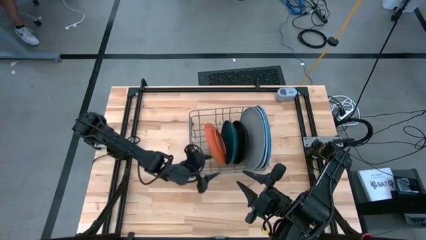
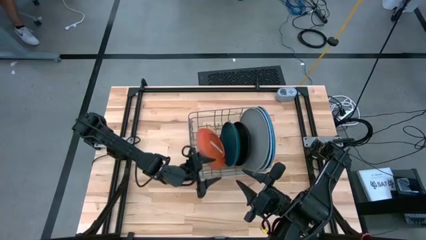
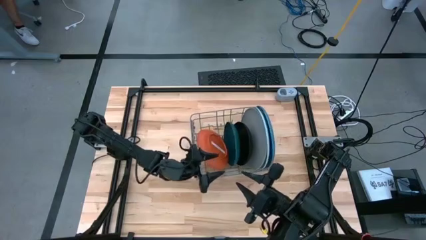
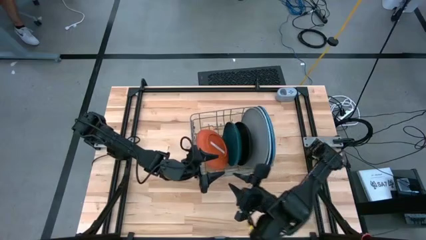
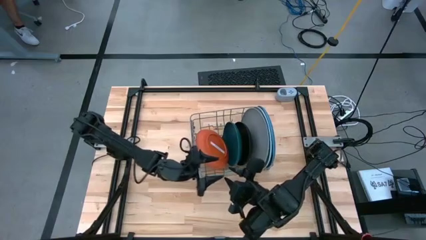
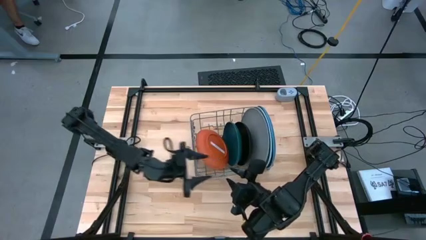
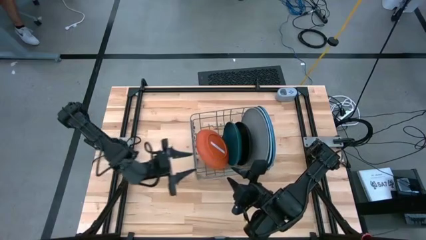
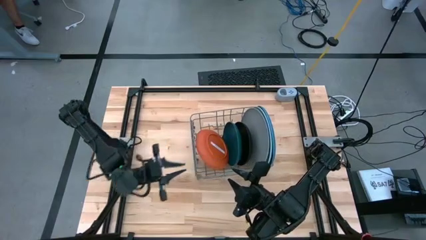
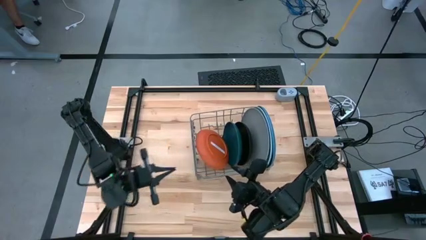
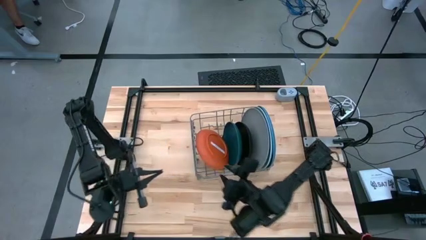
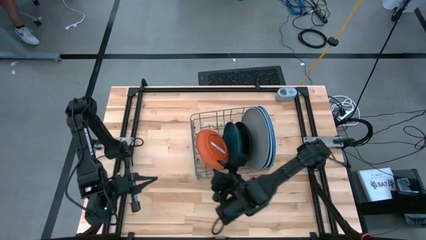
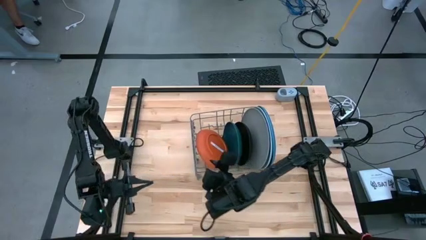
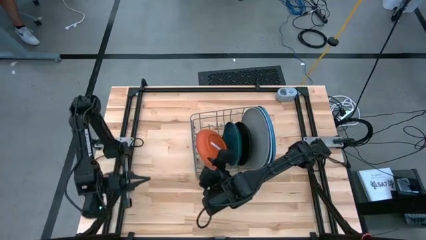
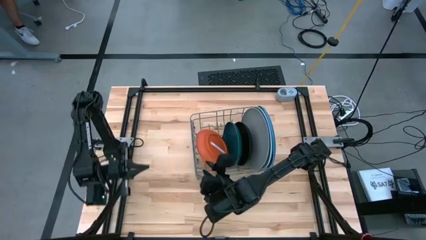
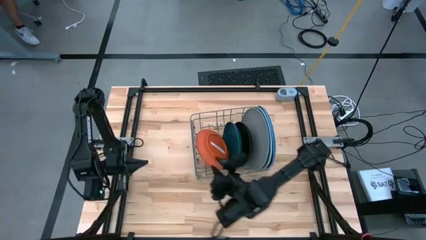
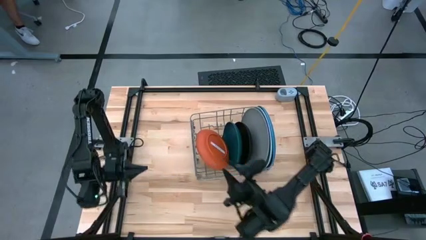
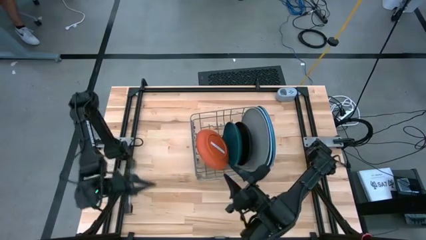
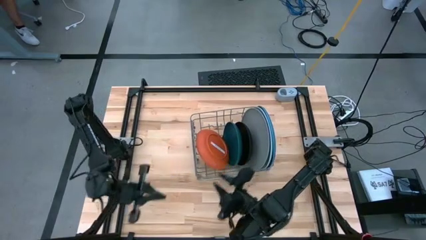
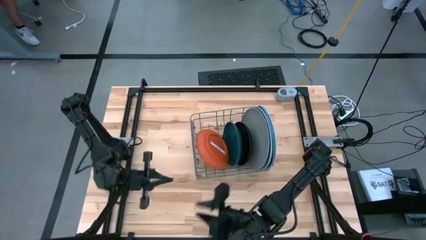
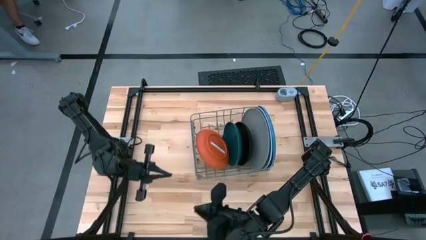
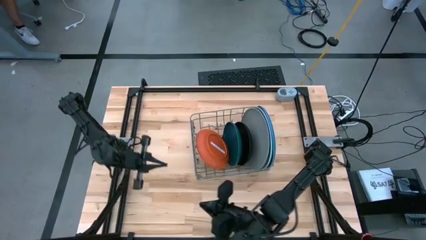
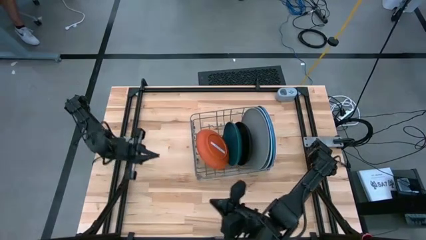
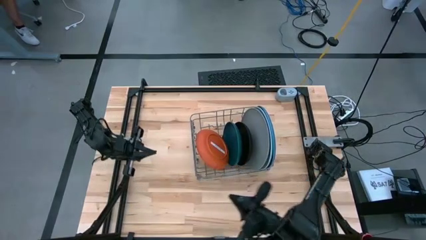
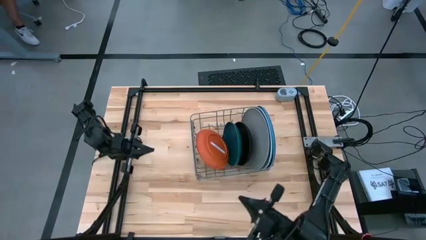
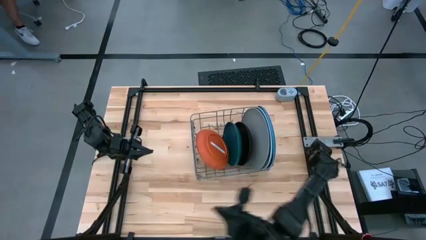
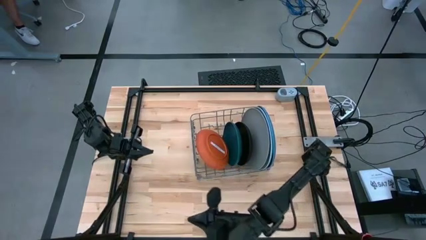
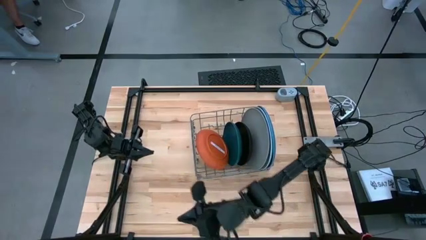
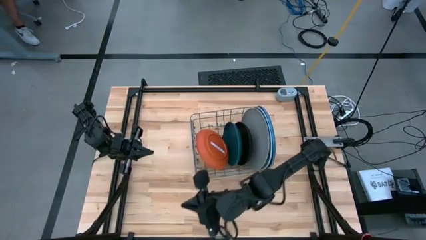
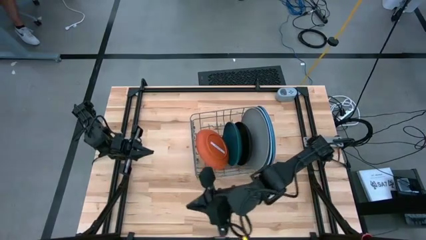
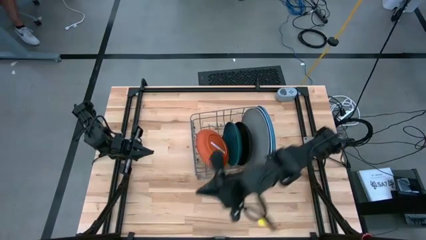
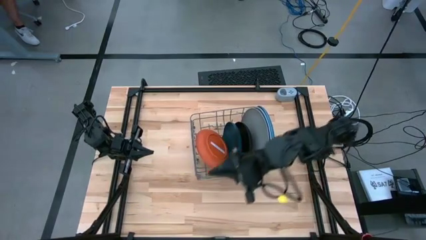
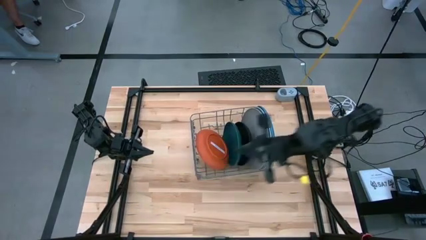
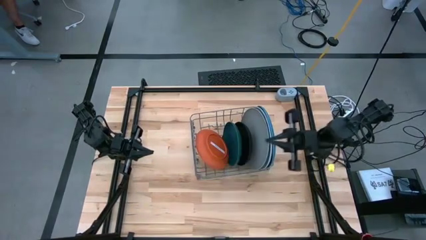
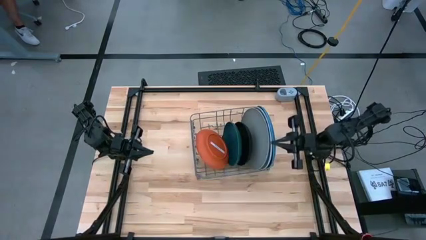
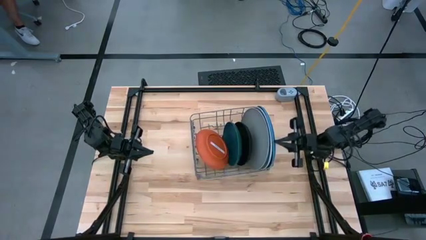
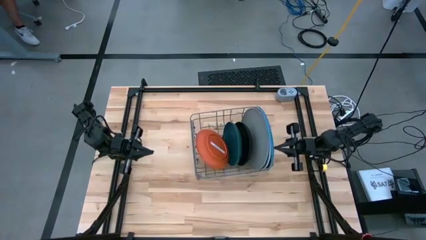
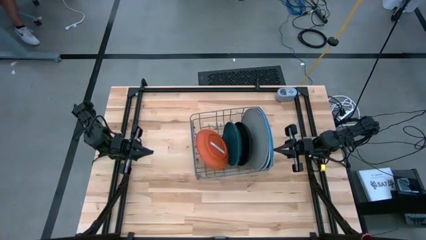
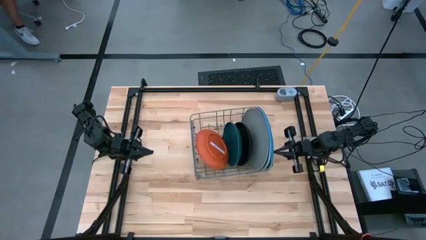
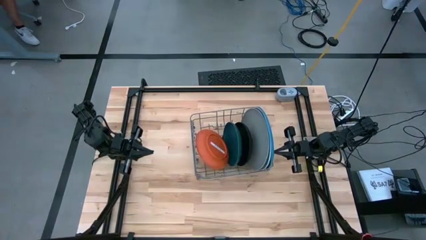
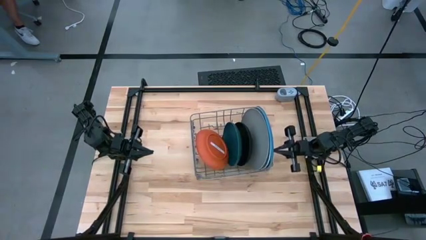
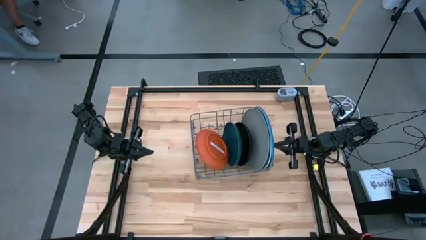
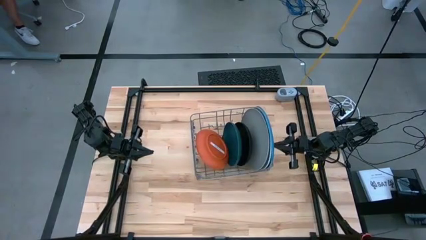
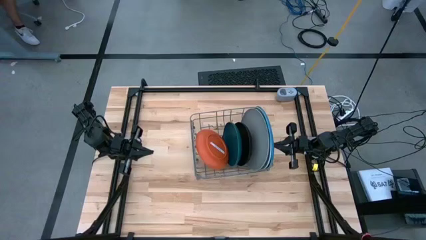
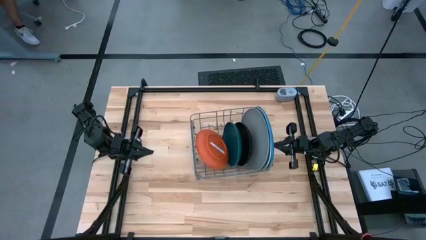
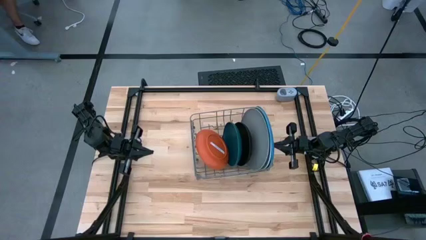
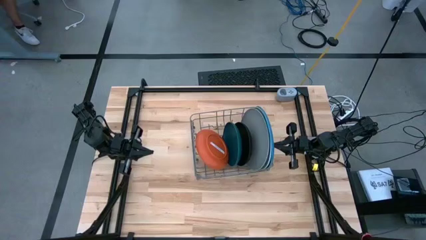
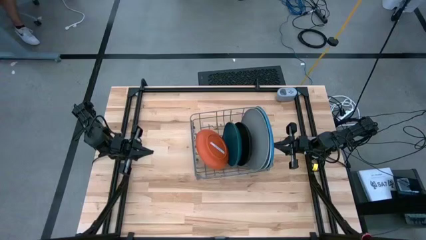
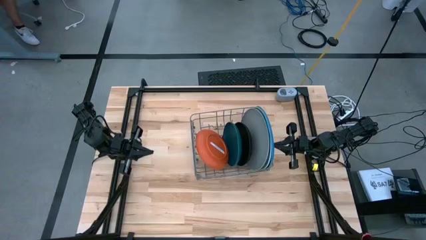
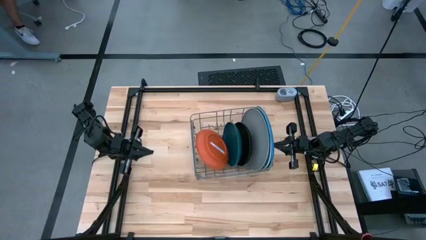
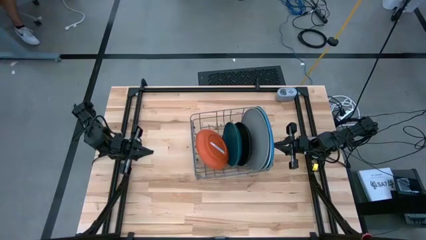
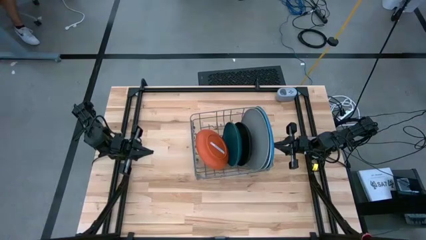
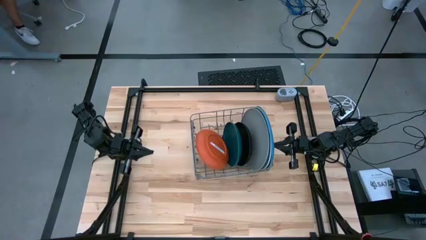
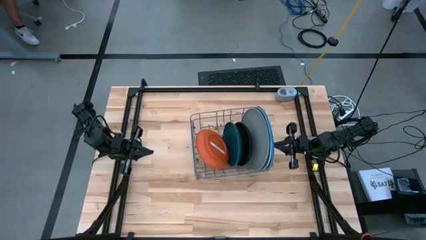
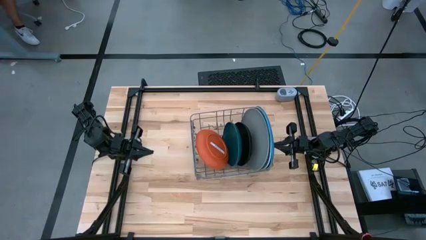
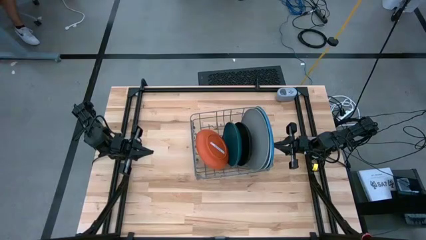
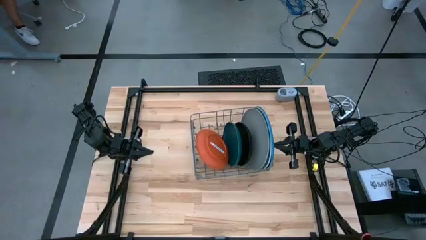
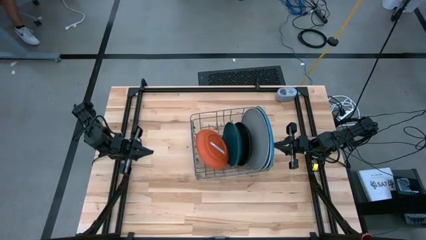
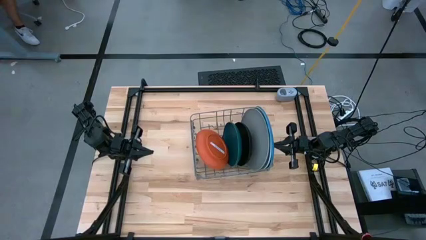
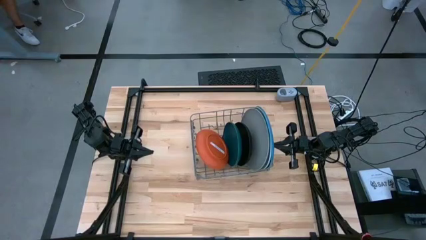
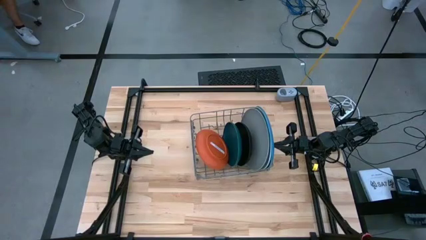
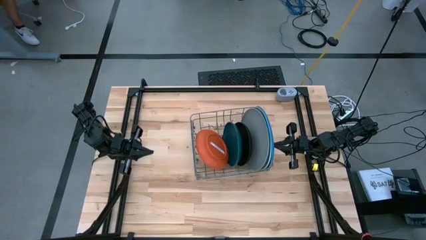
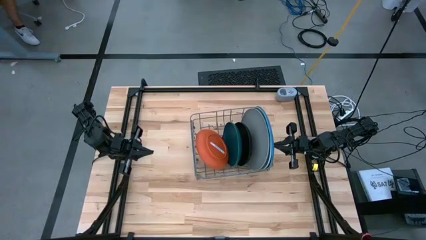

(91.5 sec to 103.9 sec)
Task: Sort dishes
Return to Home Position
